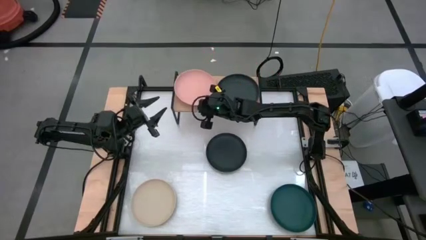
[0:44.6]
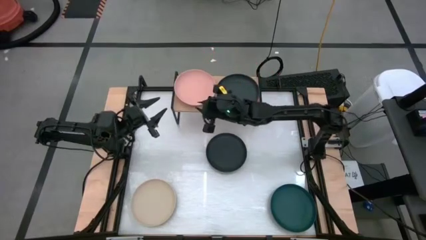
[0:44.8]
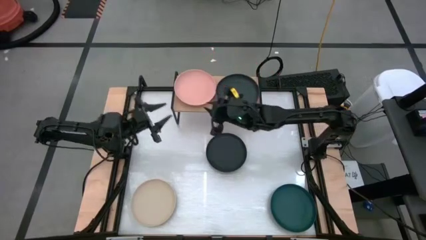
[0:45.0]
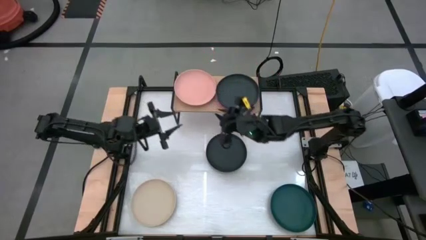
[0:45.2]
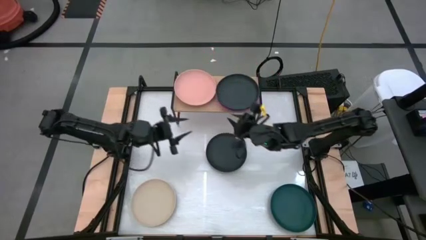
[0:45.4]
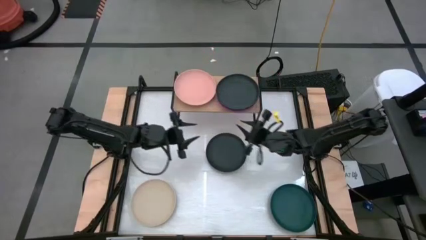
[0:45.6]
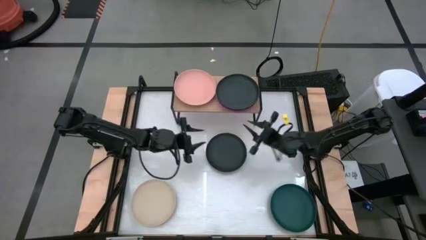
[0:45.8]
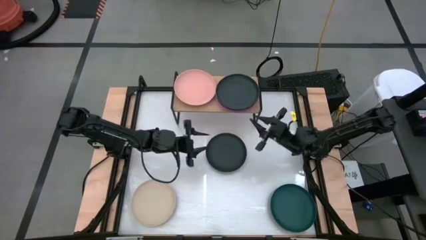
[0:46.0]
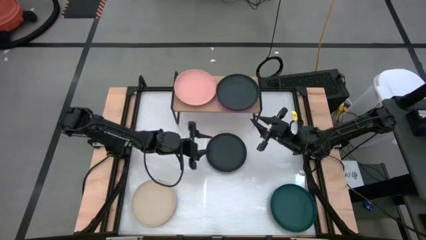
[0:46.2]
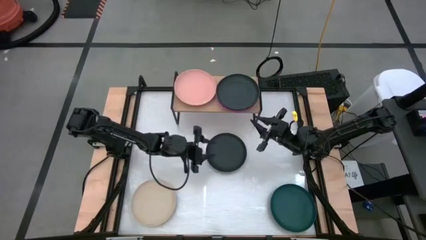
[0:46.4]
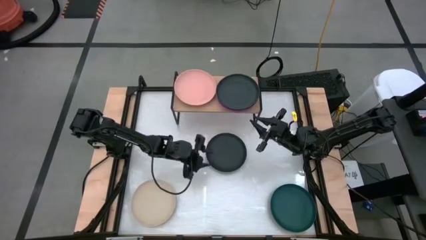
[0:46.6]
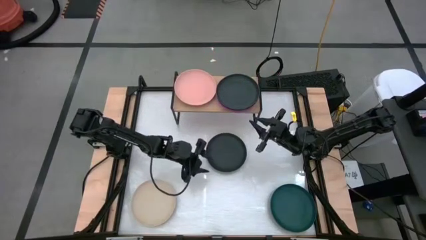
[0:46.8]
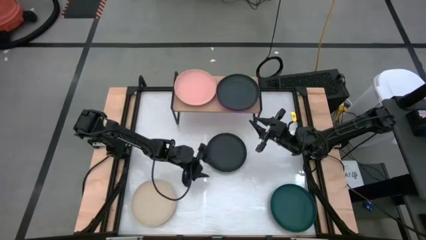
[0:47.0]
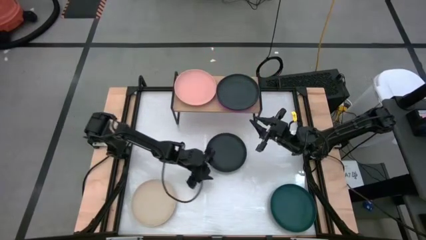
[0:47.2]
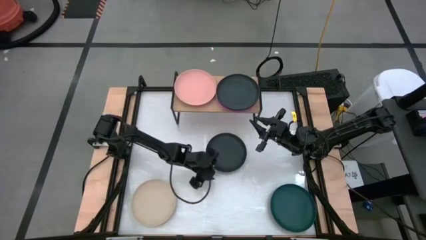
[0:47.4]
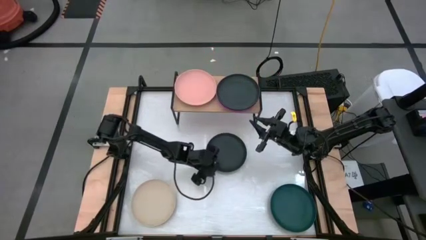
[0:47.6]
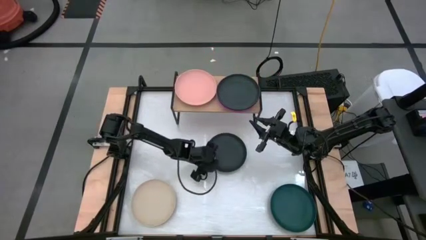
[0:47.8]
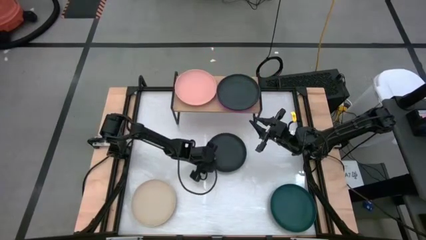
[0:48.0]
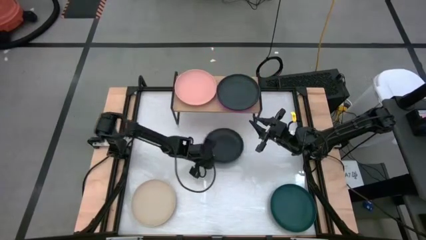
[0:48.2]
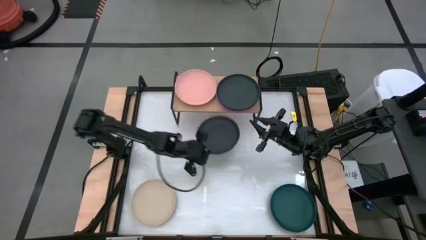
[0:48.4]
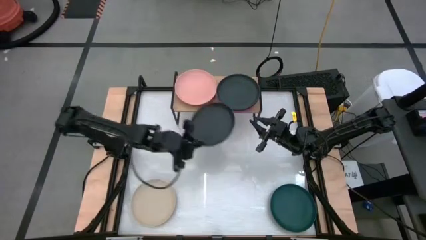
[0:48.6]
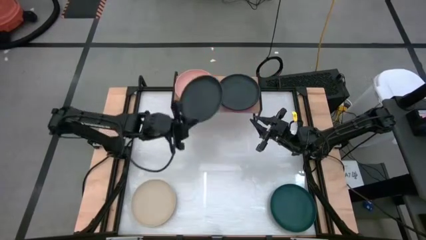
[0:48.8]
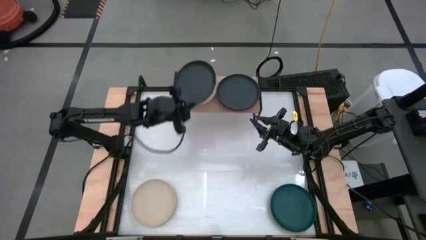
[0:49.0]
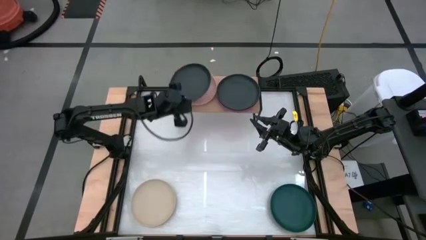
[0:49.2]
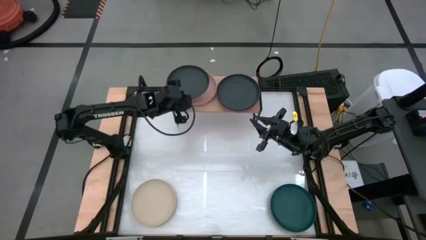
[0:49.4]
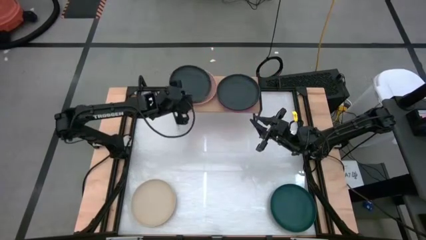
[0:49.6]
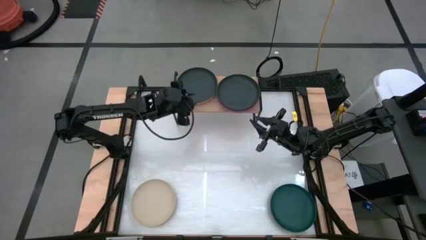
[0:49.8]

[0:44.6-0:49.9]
Task: Place and stack plates onto a shelf
Stack the black plate on top of the light pink plate on the shelf

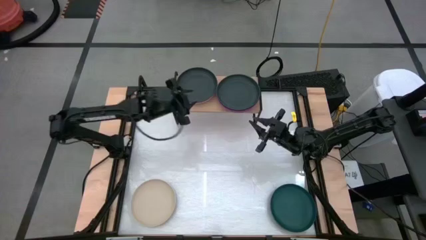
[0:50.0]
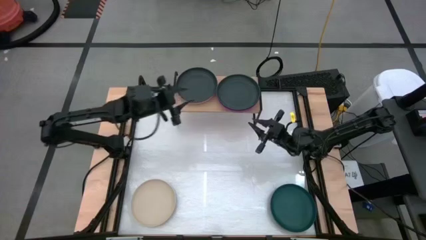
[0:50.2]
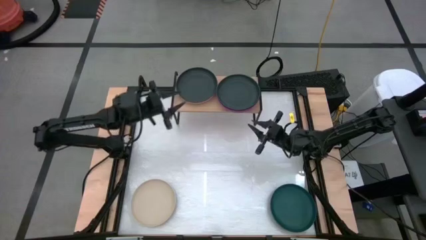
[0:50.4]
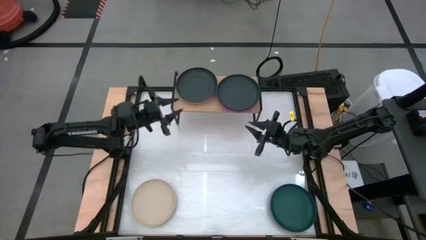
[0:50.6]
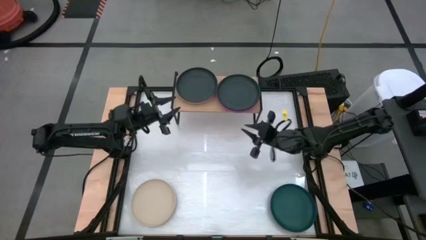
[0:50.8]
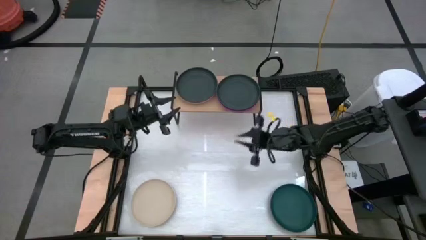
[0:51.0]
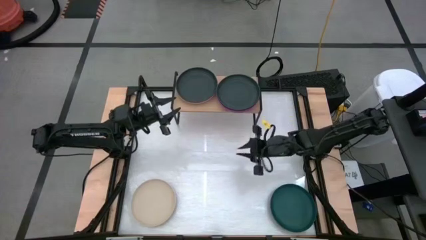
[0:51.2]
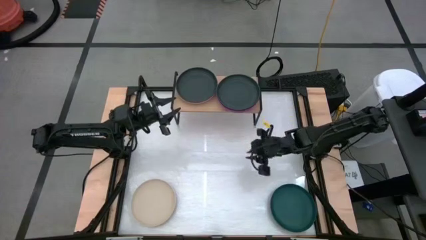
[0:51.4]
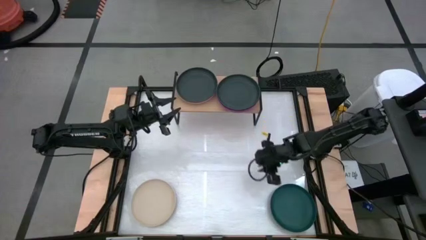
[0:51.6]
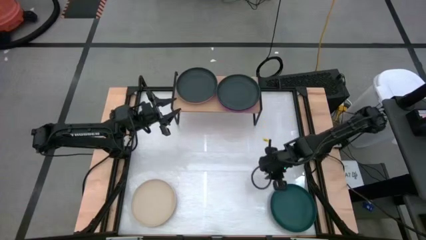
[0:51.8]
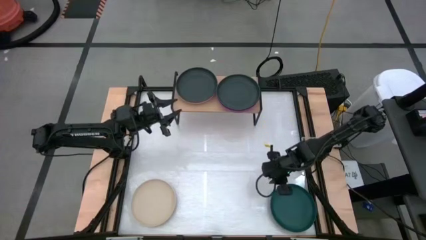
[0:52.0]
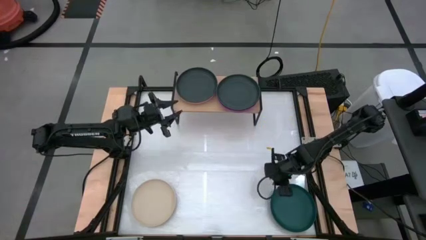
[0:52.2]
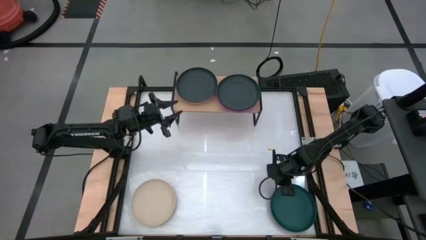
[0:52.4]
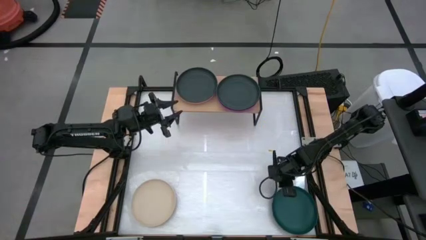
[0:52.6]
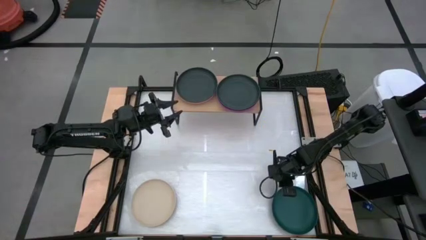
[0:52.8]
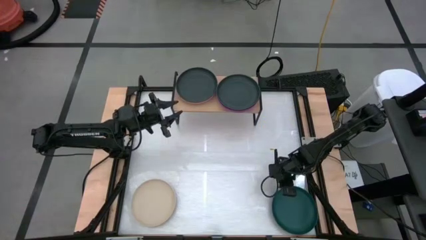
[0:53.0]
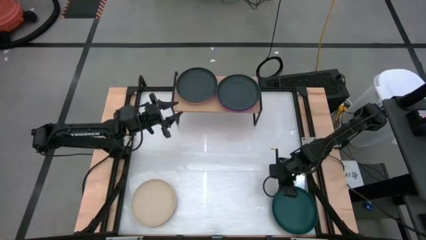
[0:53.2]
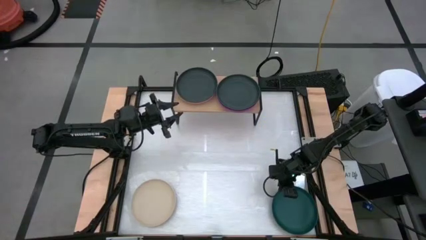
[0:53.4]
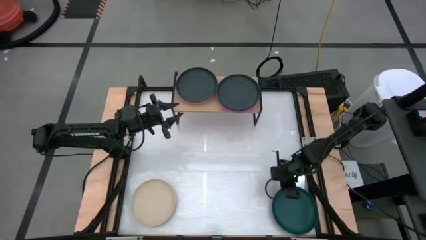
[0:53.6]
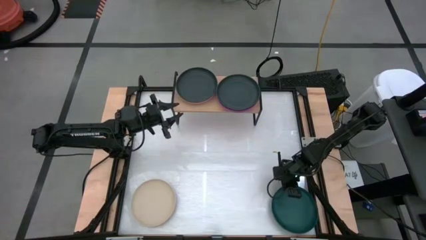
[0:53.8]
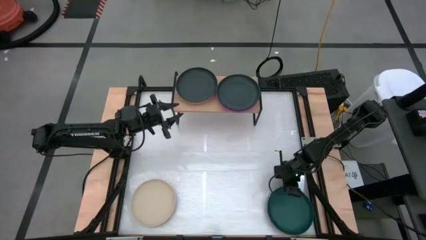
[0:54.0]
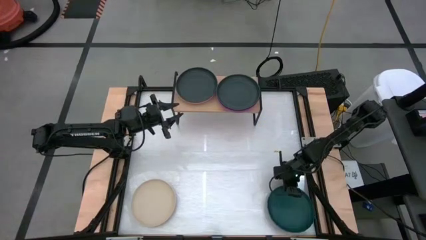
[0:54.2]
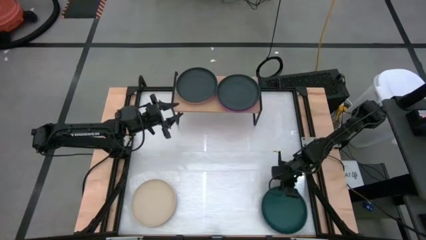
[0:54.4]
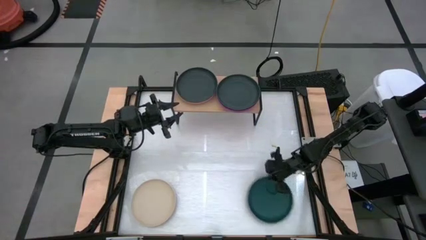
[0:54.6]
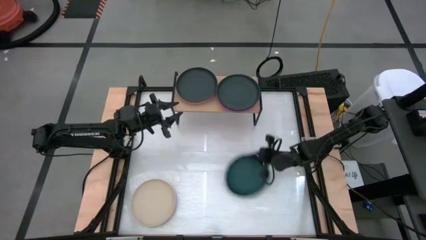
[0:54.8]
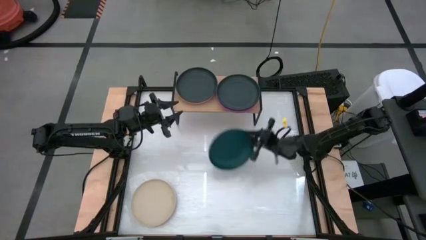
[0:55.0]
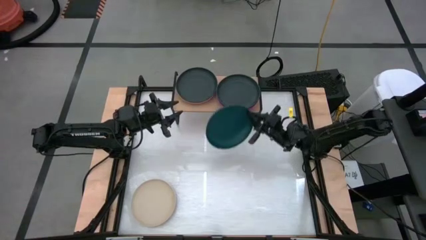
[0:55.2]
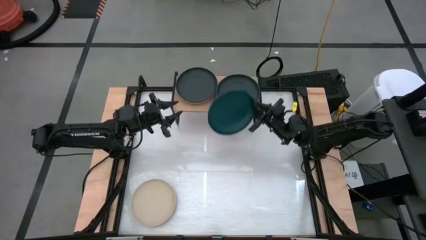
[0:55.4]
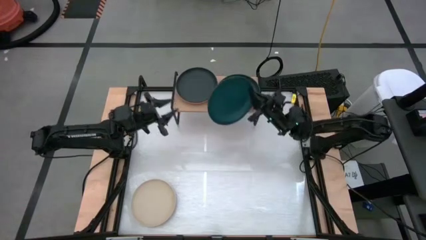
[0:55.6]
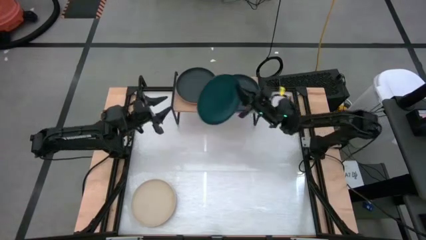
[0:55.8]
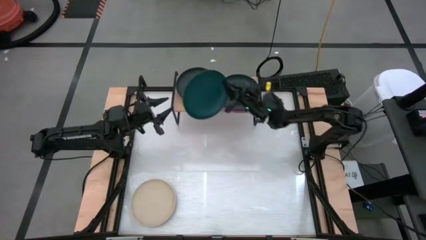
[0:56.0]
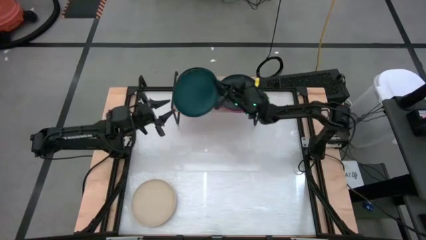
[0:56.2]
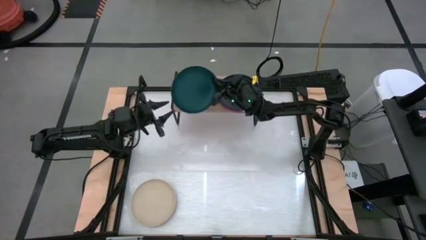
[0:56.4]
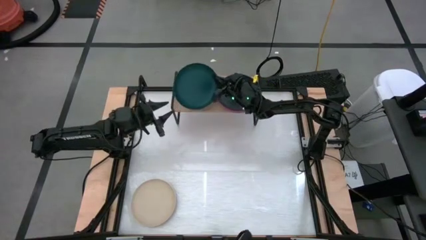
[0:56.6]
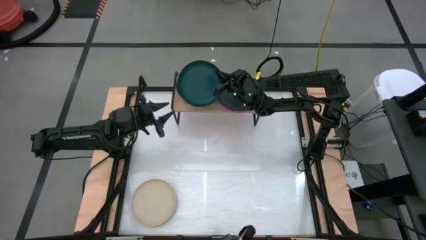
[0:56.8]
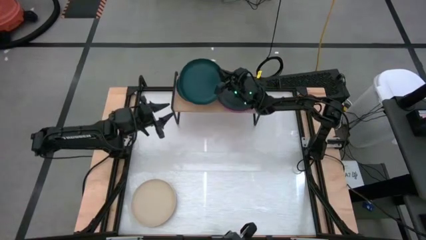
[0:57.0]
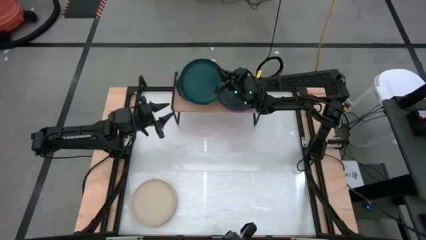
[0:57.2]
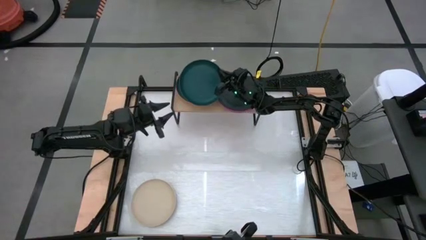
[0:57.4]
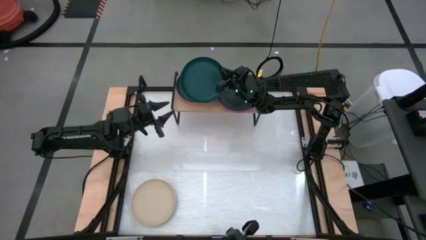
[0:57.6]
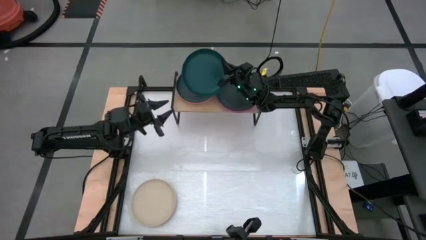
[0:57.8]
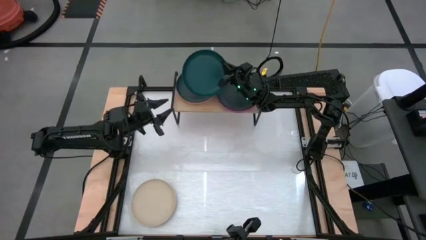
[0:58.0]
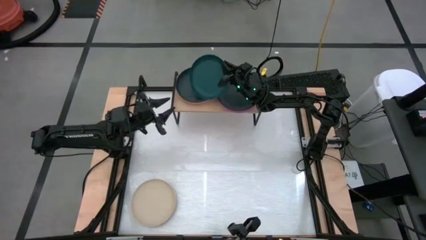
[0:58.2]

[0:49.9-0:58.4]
Stack the dark green plate on the left black plate on the shelf

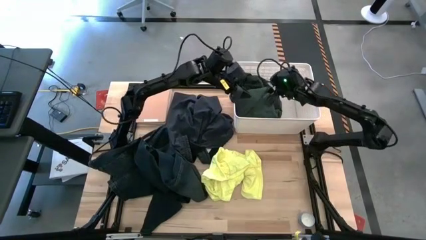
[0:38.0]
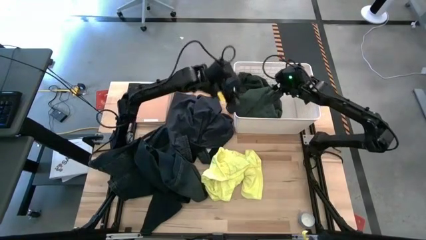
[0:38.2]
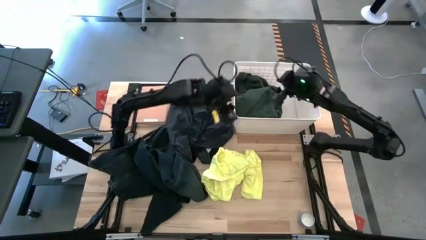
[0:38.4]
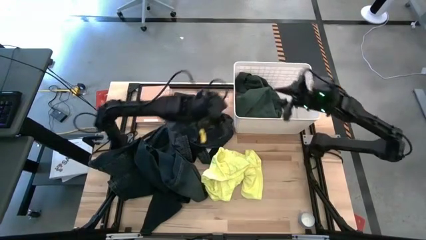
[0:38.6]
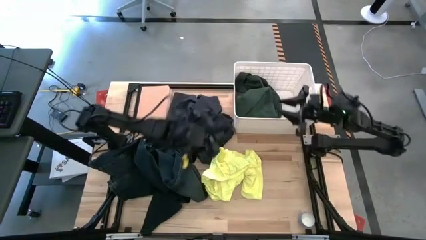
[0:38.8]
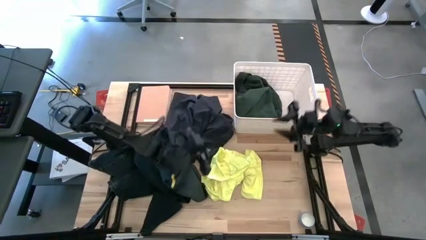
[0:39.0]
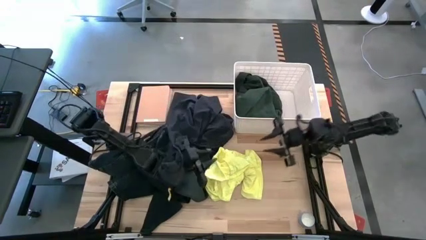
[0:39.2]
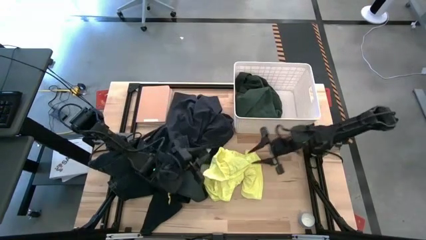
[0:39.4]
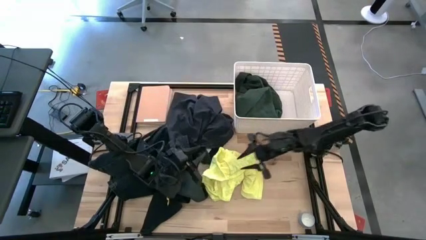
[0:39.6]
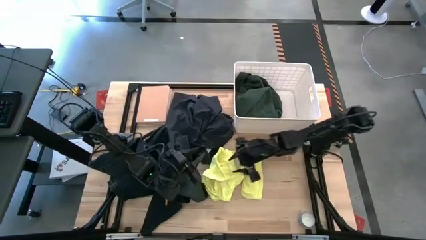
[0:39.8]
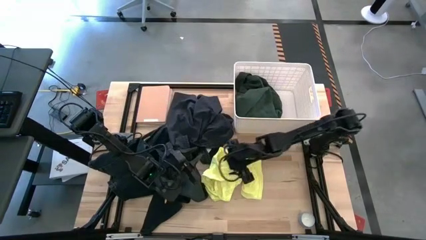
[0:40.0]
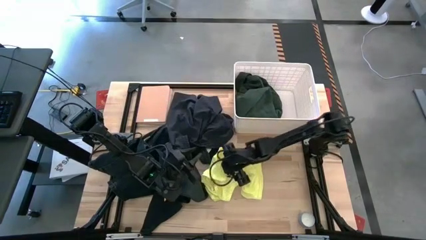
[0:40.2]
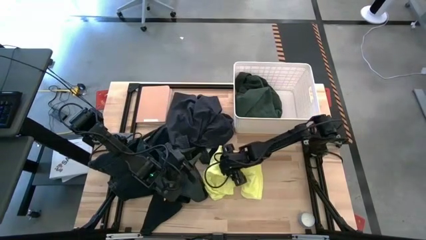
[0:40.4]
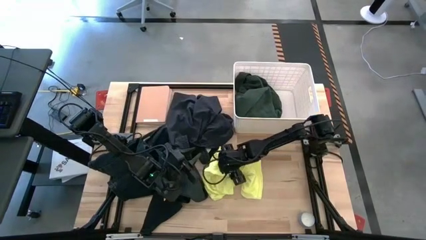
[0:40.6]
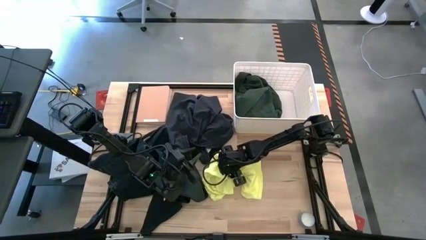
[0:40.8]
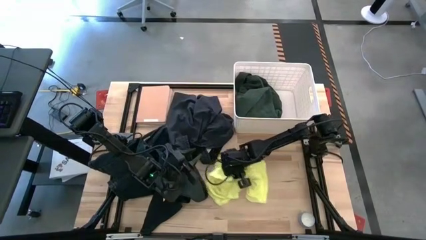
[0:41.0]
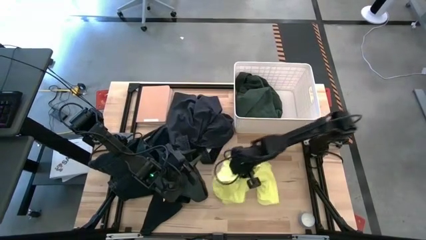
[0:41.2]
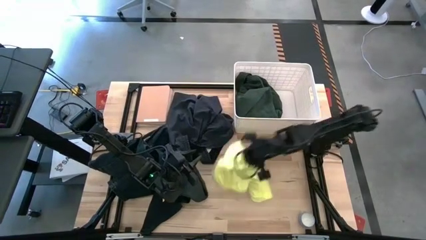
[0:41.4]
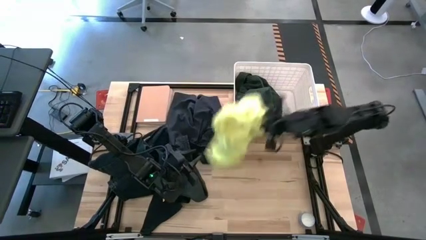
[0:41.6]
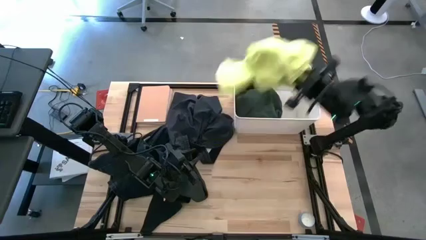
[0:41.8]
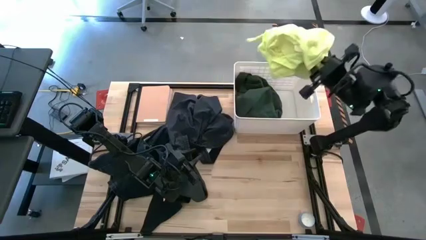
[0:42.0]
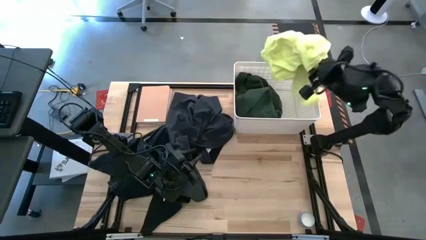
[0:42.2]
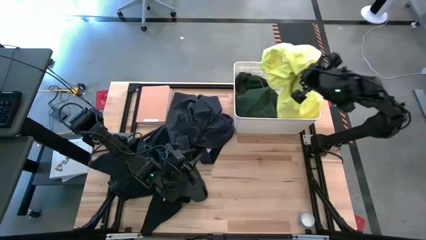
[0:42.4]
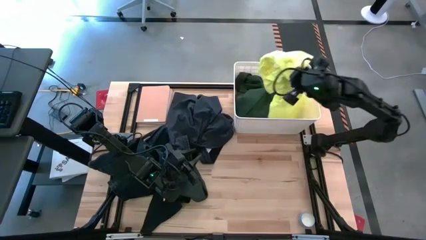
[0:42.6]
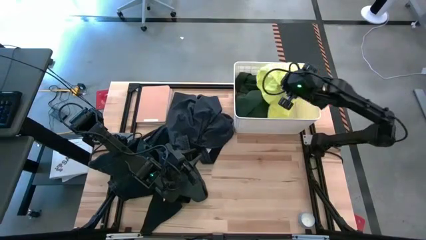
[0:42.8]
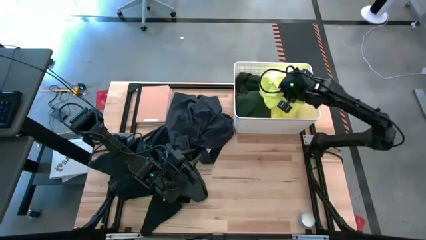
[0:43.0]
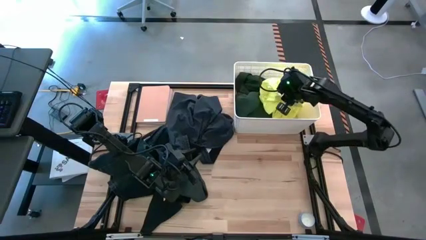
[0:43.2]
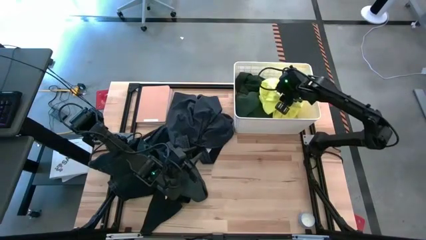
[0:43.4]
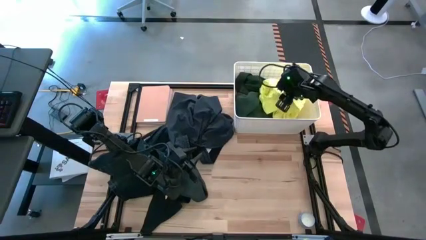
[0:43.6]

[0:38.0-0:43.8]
Task: Sort clothes
Put the yellow shirt into the white laundry bin
